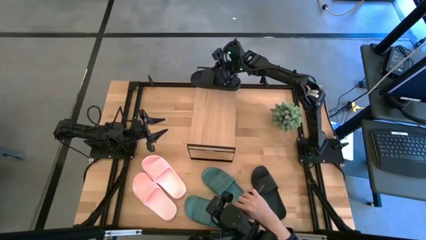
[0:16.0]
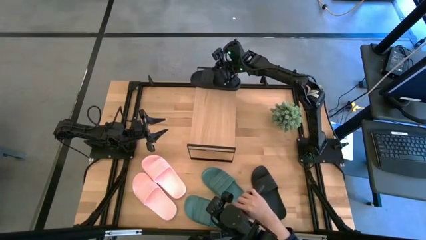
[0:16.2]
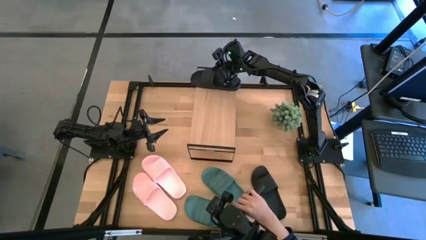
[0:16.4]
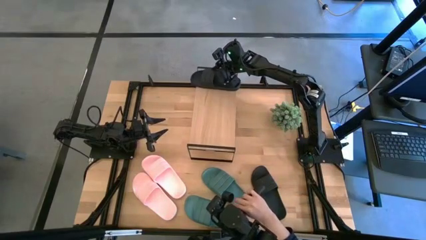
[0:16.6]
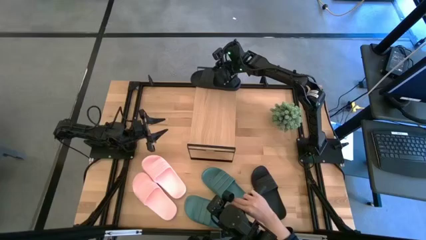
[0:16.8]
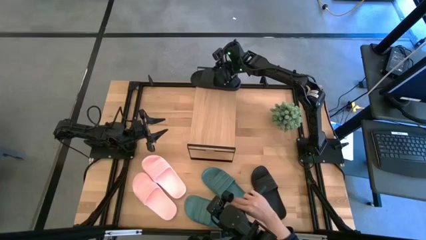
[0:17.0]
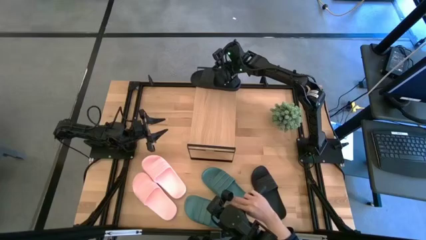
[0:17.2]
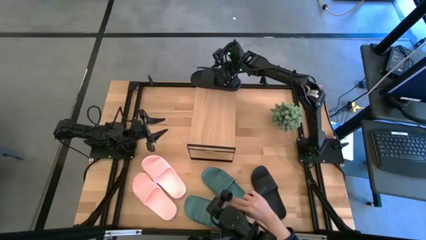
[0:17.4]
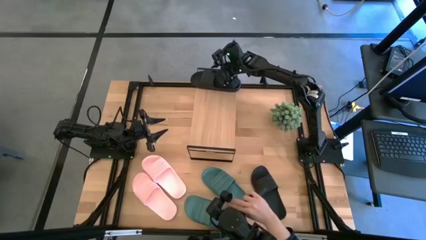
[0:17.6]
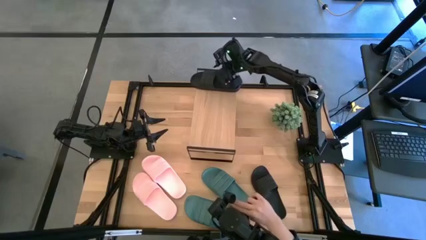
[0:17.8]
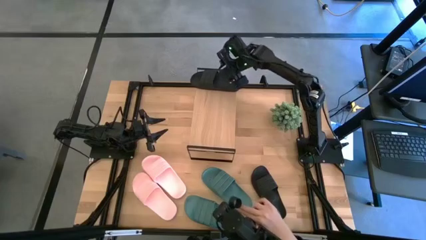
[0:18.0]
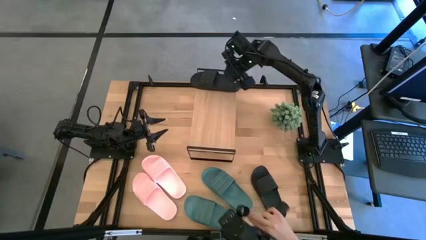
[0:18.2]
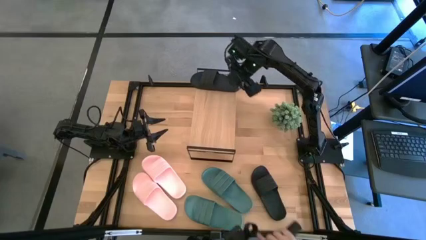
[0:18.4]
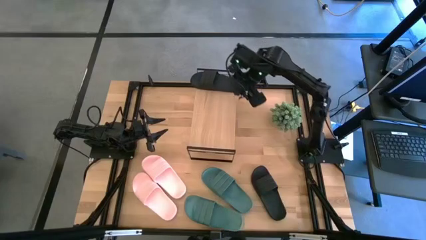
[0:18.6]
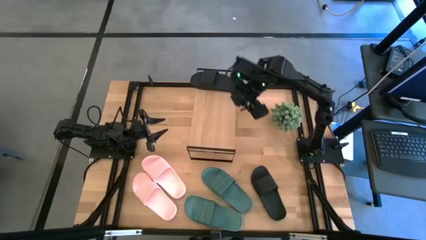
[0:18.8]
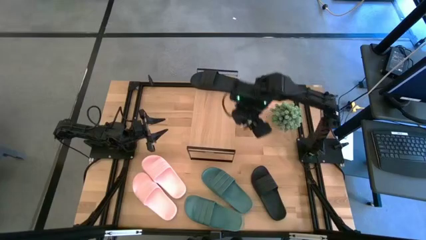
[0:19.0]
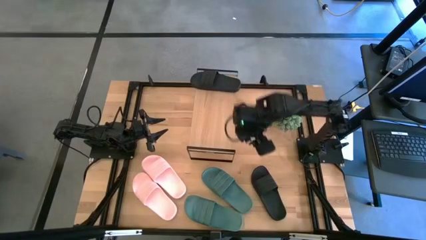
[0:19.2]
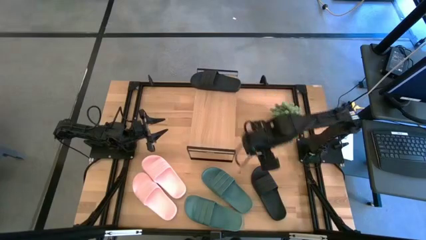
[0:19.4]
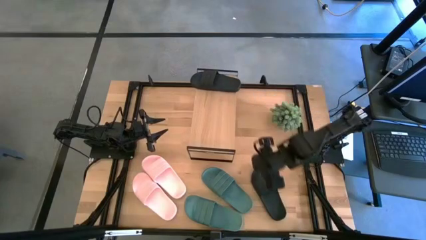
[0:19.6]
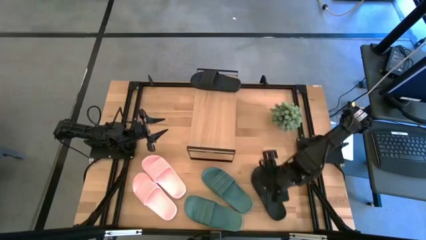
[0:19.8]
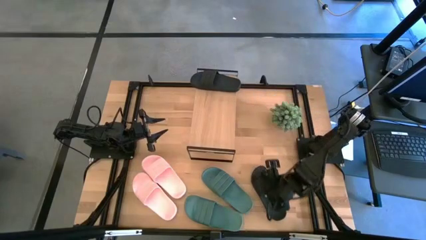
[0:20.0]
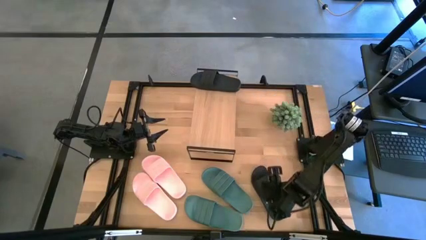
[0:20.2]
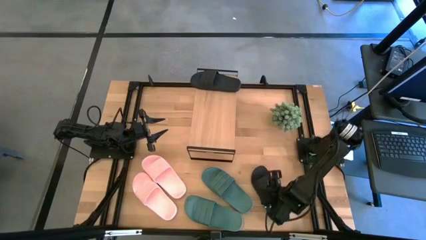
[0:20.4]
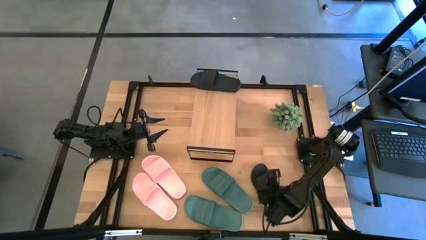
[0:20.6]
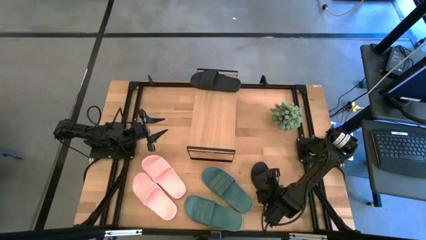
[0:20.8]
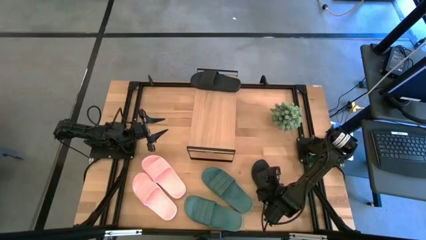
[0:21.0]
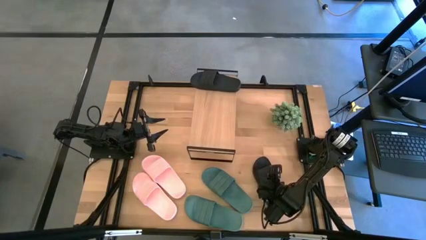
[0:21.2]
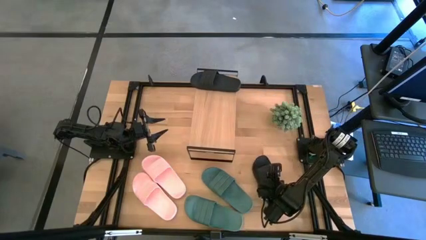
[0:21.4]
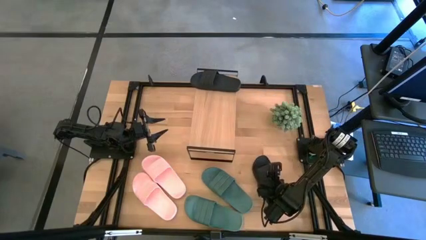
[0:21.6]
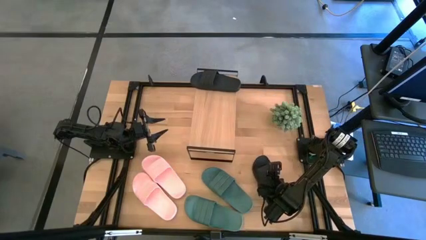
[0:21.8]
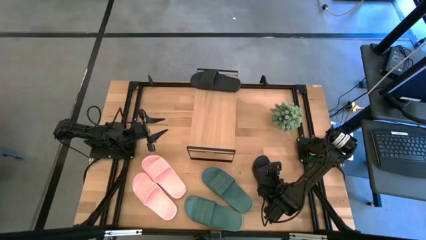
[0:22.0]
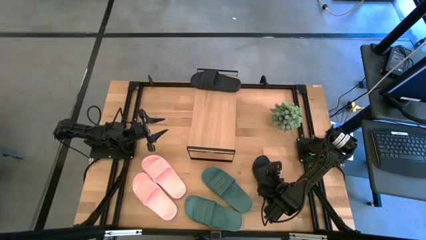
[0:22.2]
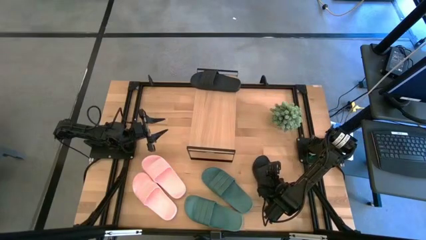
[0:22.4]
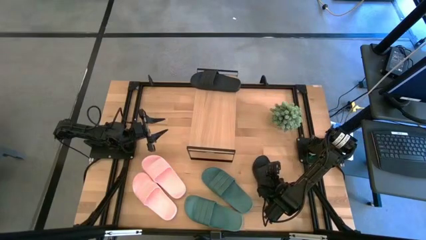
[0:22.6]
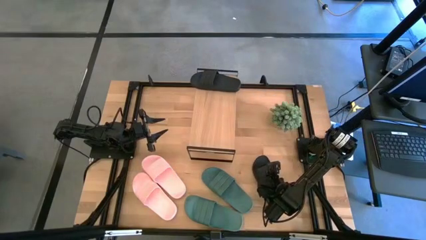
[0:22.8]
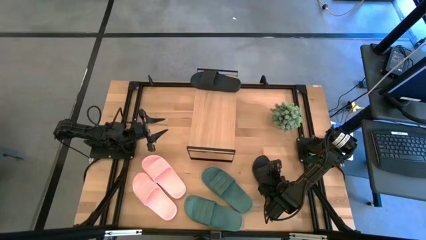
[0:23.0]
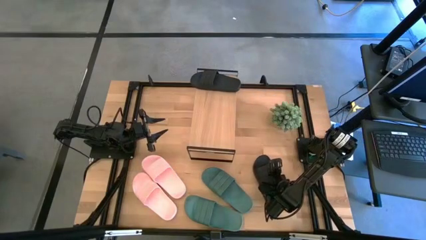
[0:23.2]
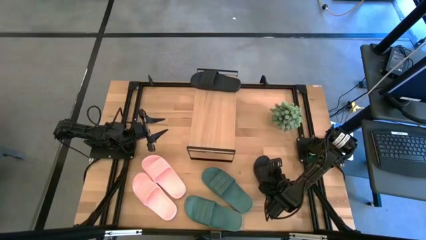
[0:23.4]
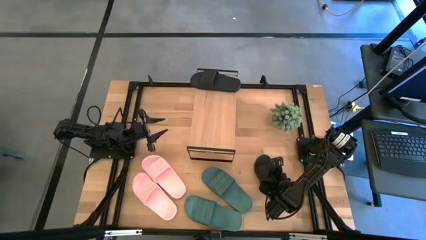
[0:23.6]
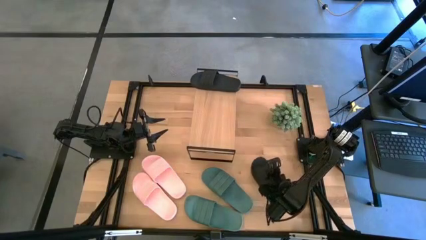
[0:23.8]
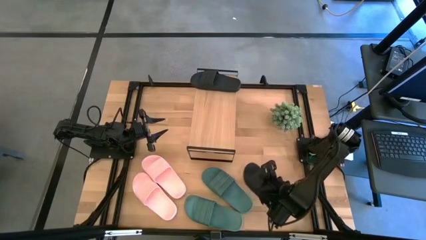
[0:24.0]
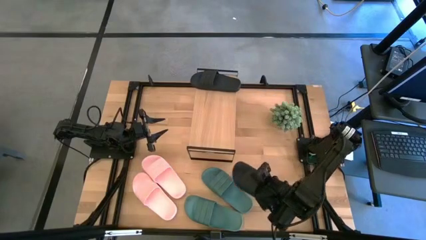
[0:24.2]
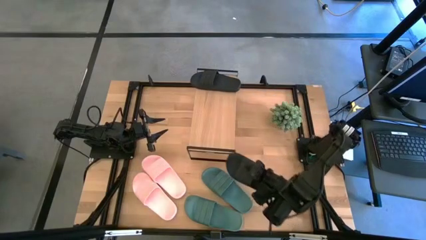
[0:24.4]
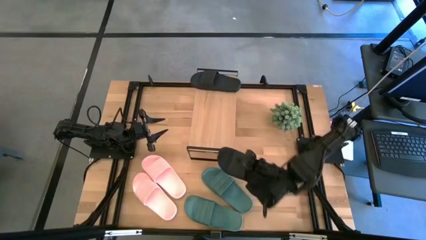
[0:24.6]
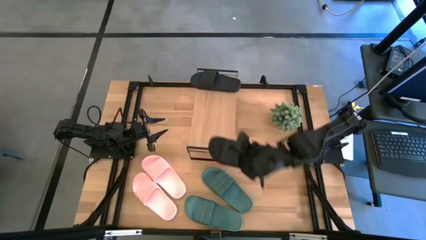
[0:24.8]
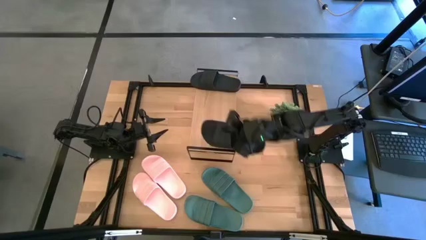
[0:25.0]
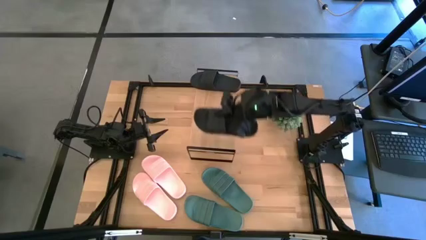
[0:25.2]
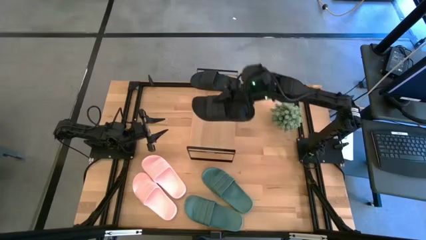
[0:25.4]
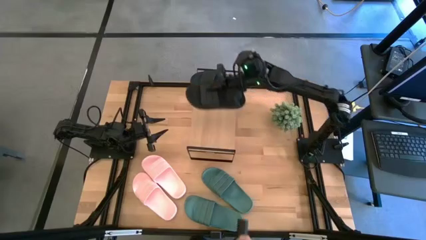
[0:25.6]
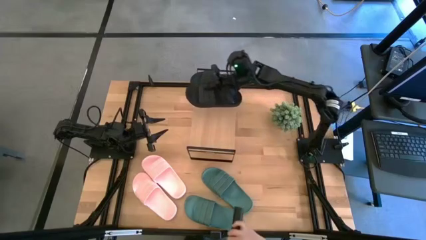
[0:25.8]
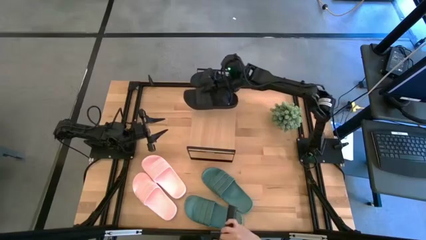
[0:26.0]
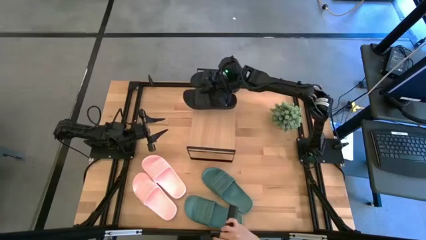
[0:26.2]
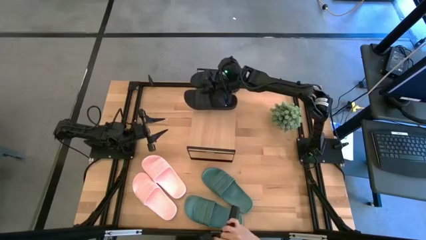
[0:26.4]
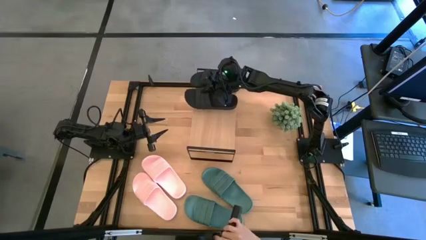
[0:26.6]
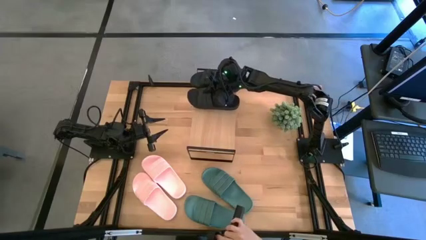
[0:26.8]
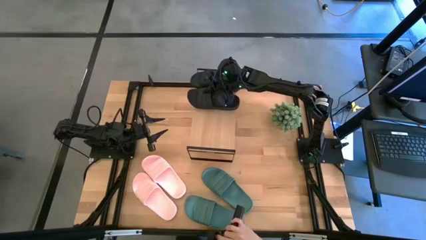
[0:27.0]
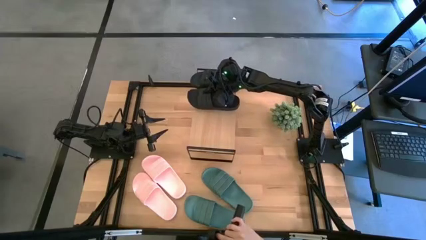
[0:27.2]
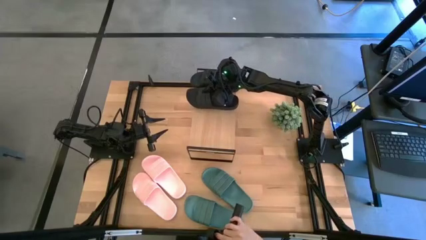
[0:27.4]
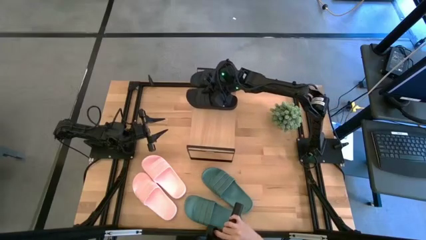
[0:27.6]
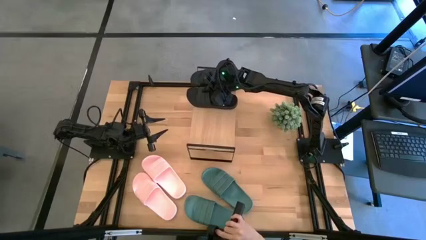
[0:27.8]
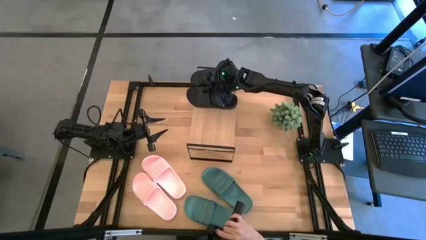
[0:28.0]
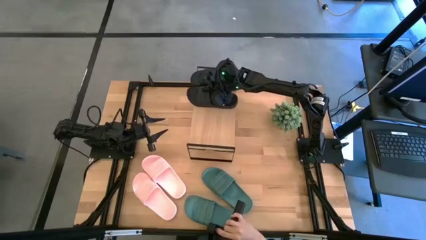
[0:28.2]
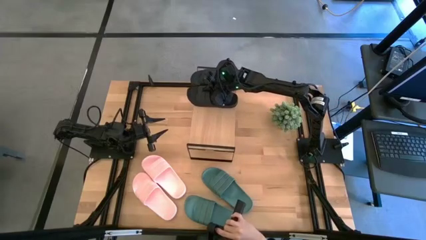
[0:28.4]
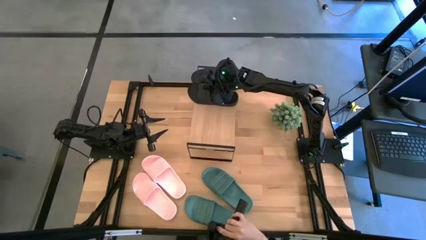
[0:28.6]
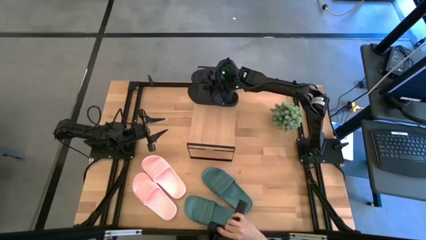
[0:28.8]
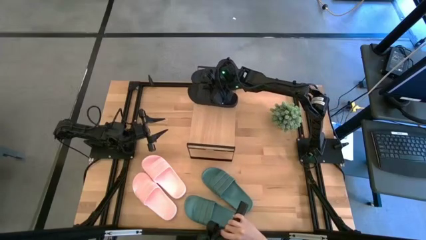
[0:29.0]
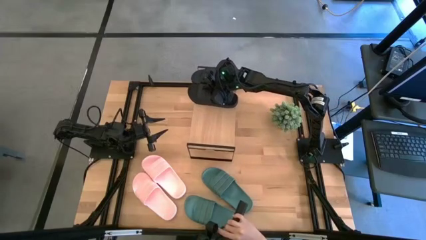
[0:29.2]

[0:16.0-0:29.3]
Task: Pick and place slides into the shelf
Put the black slipper on the shelf
